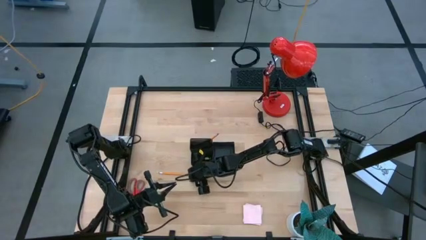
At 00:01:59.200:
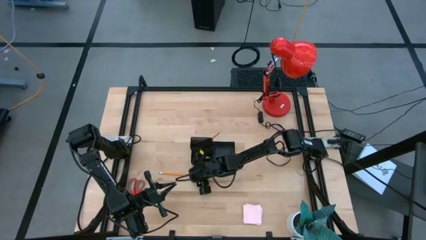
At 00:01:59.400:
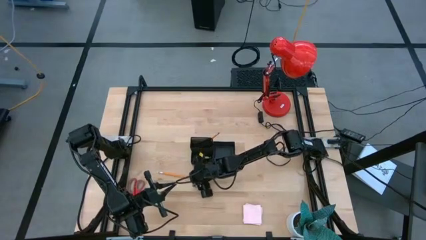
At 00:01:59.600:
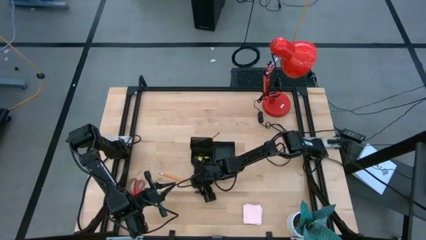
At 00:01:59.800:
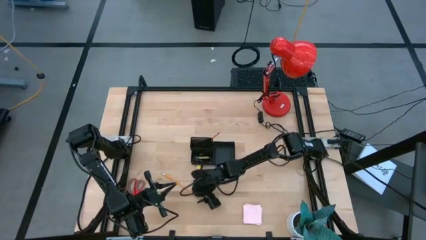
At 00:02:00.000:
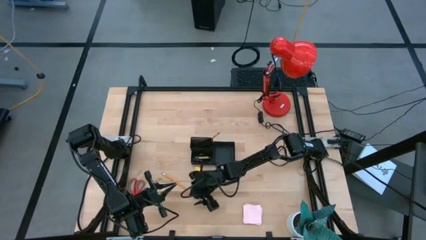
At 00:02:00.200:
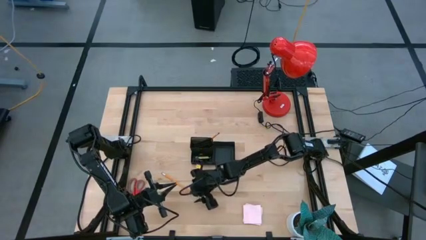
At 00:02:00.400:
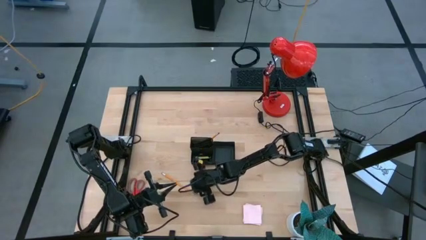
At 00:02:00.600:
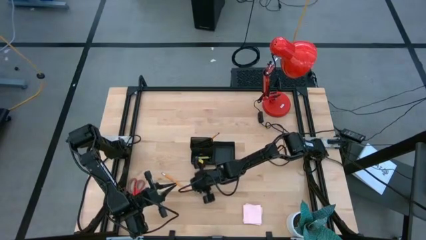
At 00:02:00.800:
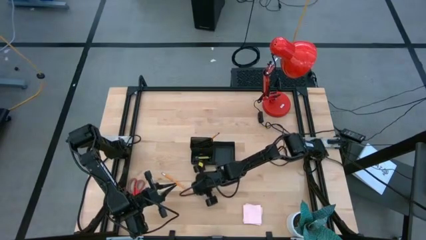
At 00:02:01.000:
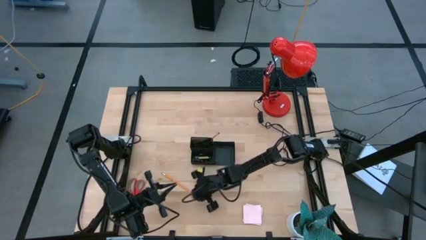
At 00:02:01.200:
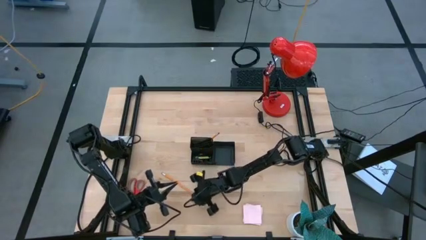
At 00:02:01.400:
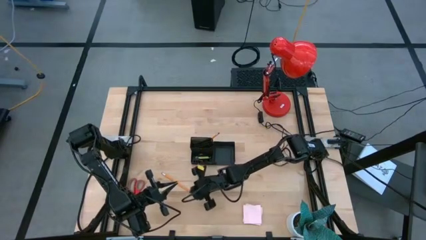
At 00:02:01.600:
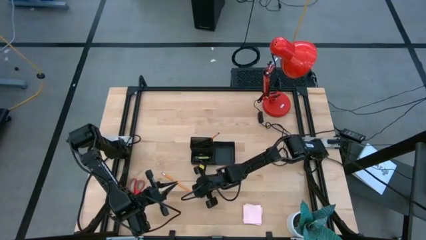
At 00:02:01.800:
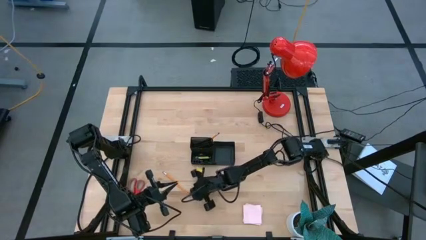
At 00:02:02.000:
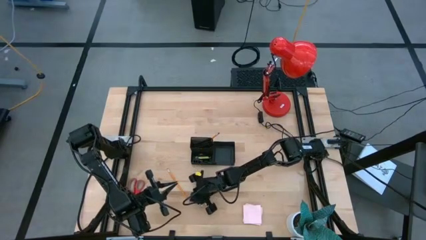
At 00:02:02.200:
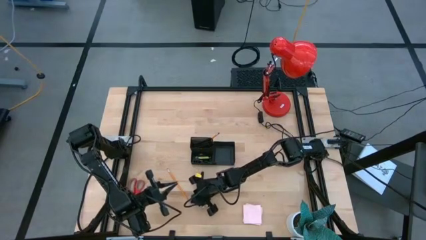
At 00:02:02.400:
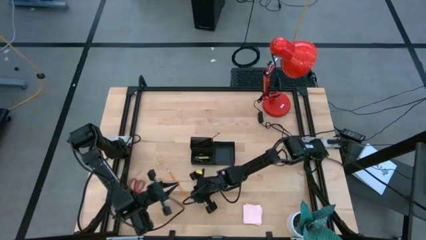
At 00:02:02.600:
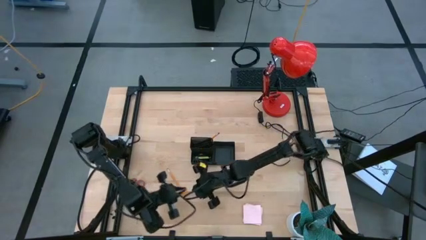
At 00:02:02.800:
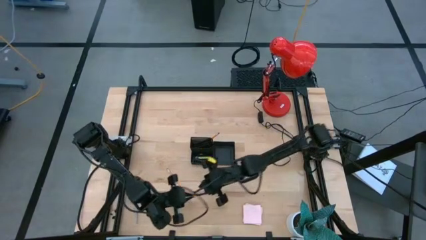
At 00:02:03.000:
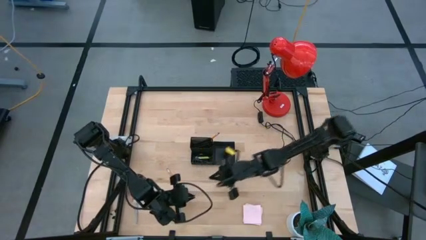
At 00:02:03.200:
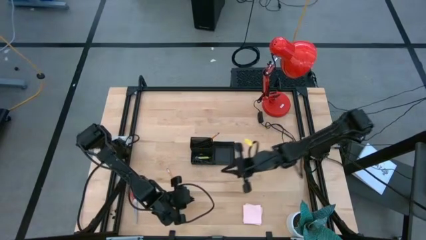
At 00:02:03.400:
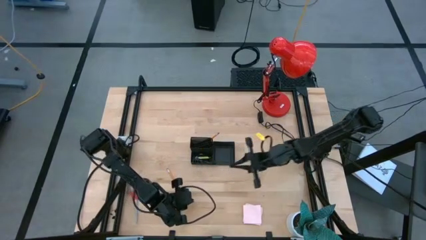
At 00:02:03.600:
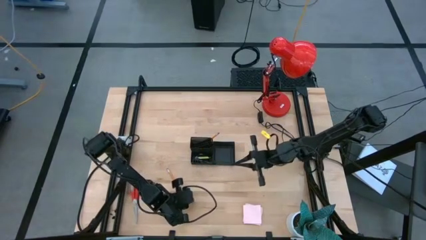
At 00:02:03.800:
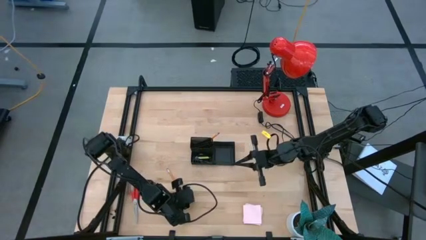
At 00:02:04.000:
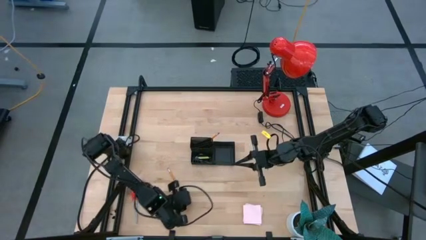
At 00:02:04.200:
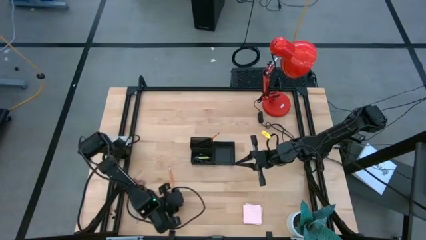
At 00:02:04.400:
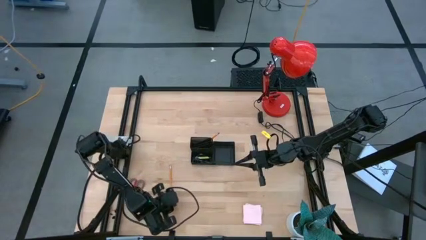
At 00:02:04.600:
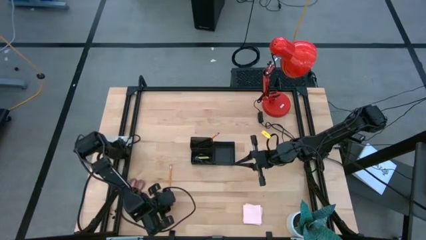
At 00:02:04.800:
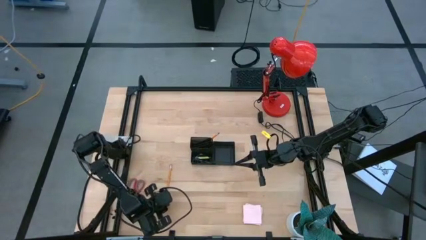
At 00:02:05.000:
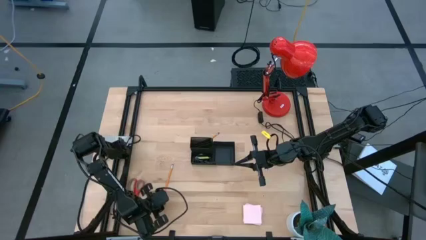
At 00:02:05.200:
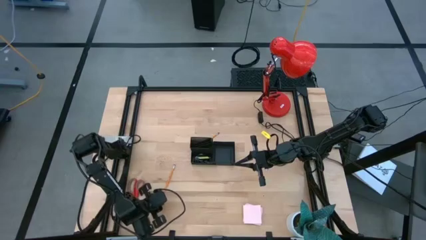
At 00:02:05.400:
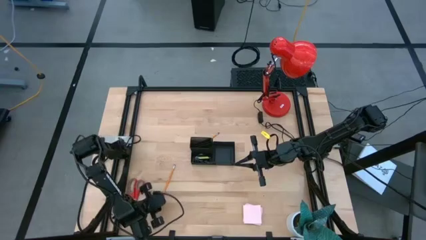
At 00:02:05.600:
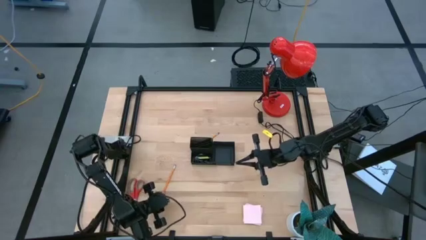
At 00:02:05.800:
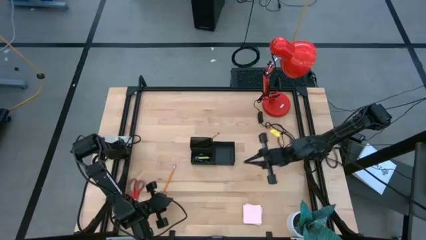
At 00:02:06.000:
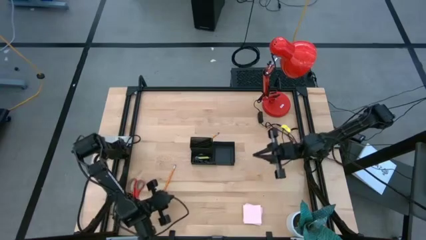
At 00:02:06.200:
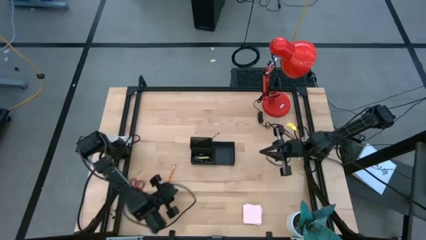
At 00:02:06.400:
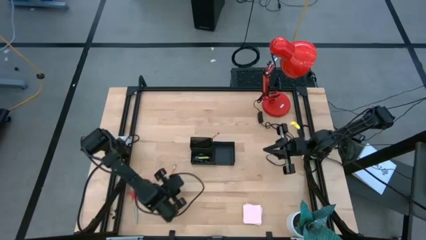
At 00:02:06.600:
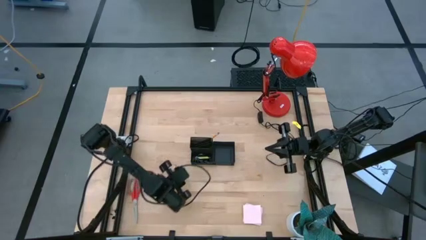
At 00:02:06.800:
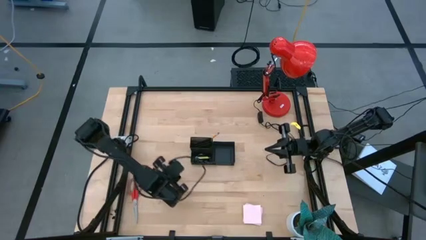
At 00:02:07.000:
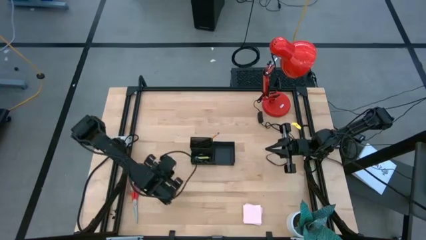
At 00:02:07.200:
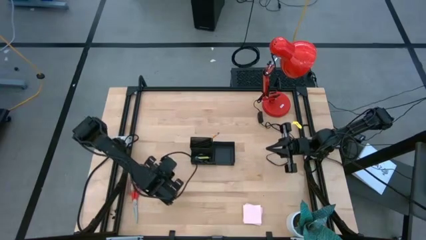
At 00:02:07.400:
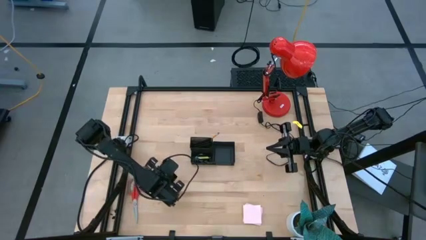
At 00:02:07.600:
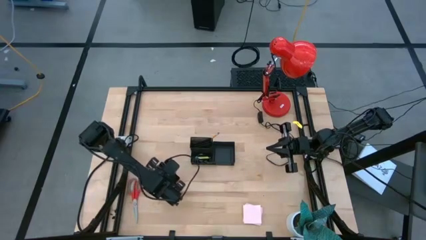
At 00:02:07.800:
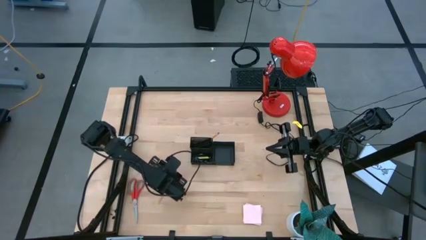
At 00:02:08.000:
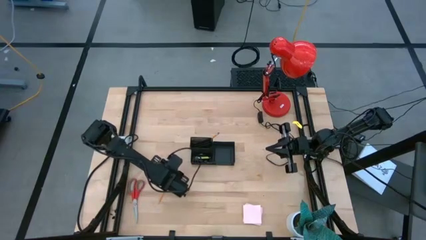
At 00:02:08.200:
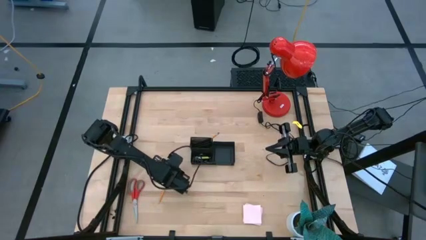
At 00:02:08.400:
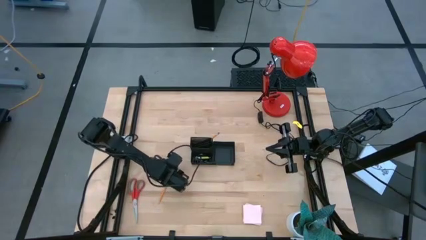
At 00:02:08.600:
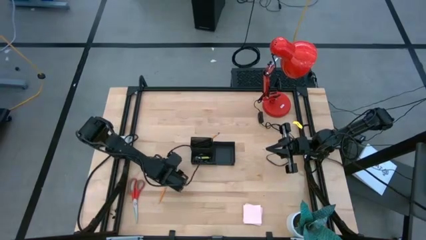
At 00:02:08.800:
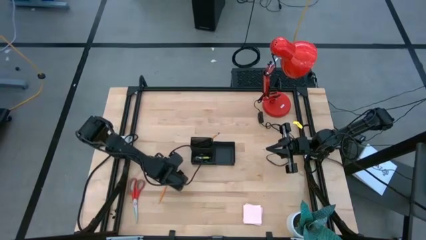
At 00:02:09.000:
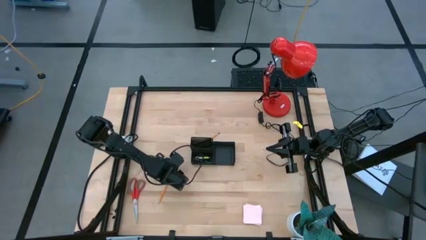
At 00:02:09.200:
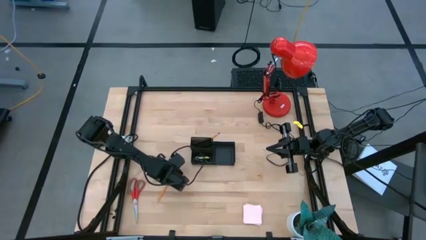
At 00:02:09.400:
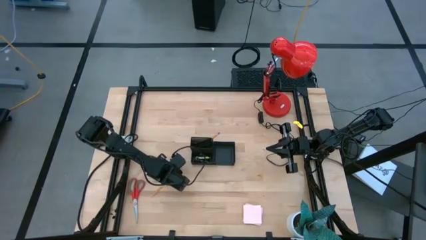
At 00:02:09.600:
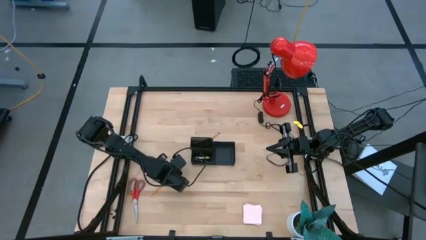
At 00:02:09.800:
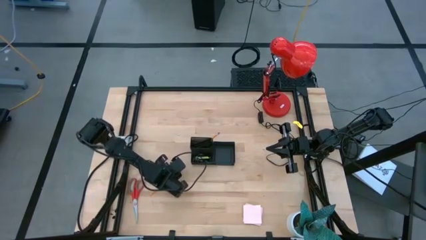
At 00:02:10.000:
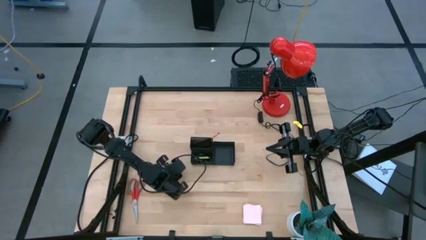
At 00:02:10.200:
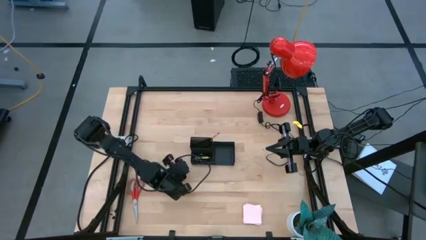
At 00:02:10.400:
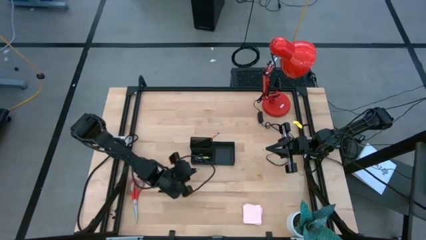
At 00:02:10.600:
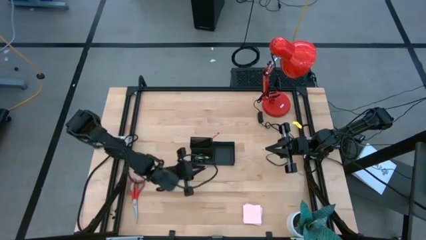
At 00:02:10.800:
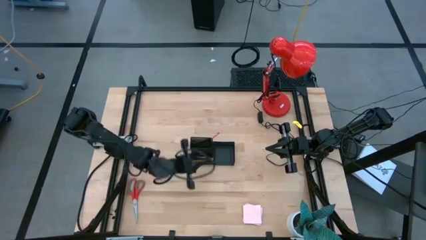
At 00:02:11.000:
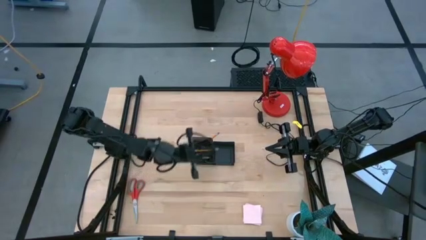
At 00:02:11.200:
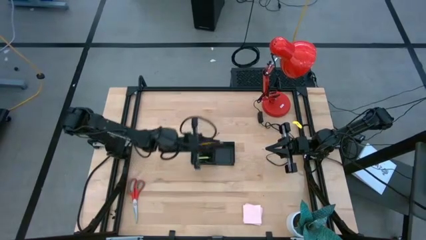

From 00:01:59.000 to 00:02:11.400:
Task: Pick and place office supplies into organizer
Put the pencil into the mesh desk organizer
